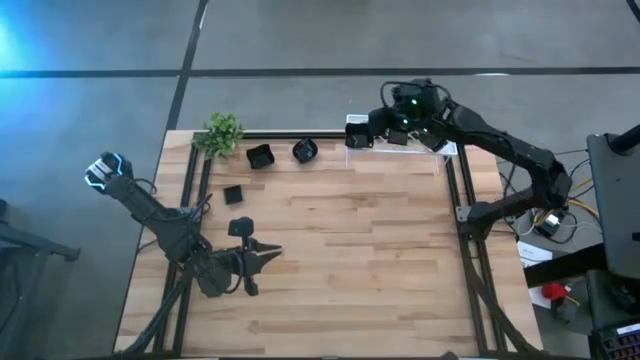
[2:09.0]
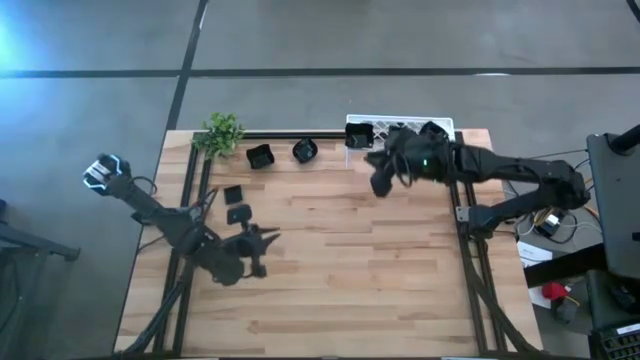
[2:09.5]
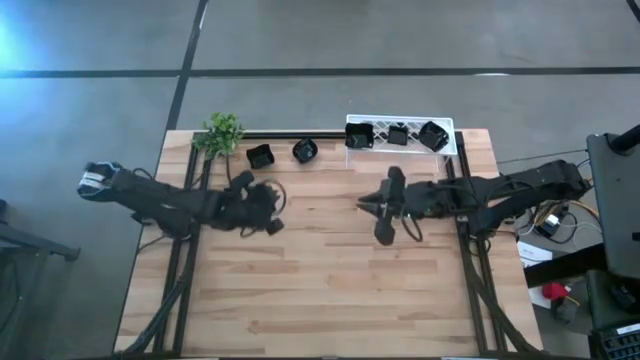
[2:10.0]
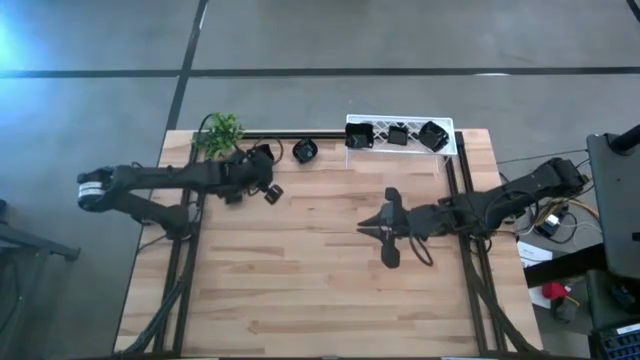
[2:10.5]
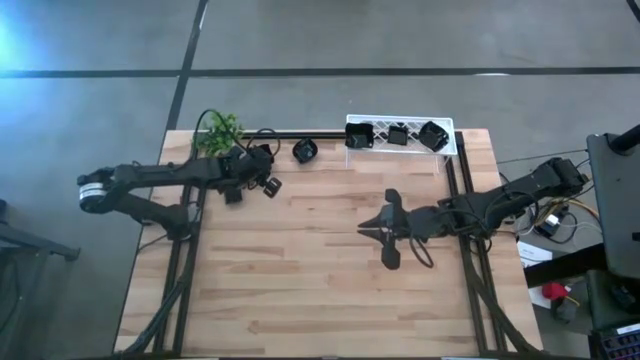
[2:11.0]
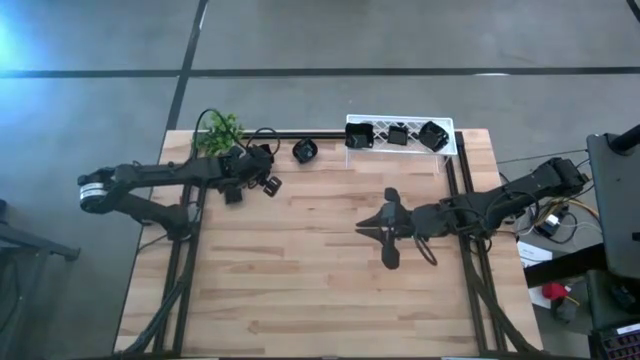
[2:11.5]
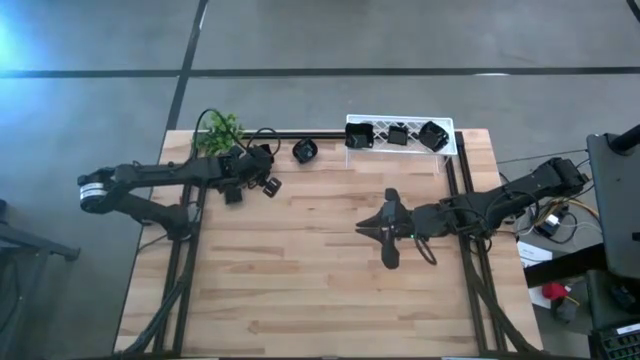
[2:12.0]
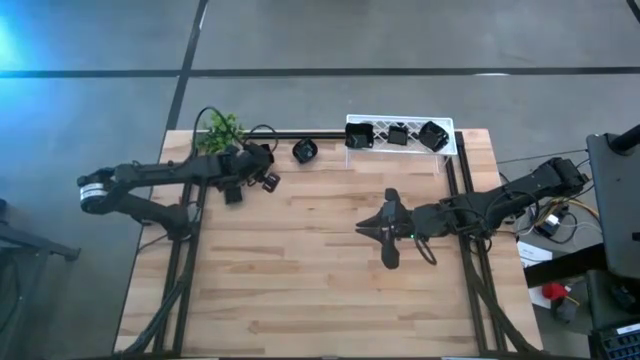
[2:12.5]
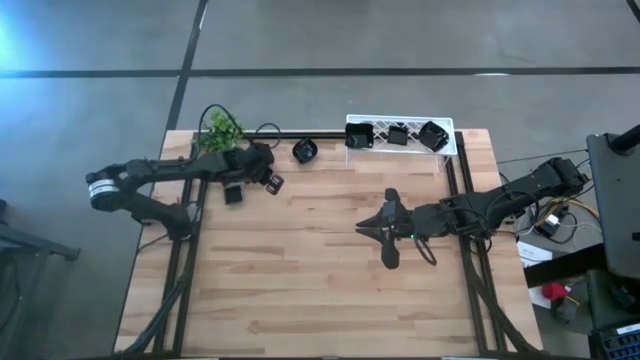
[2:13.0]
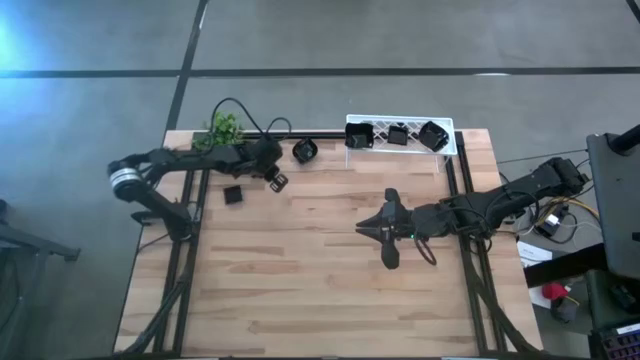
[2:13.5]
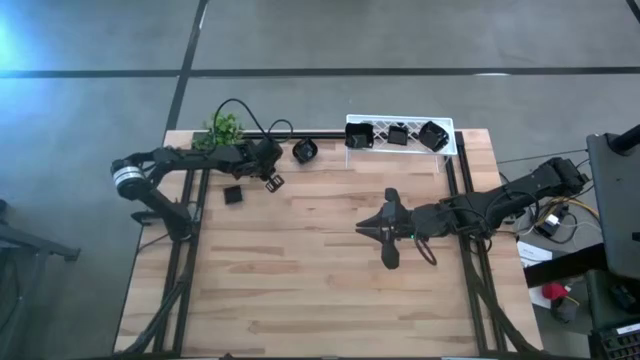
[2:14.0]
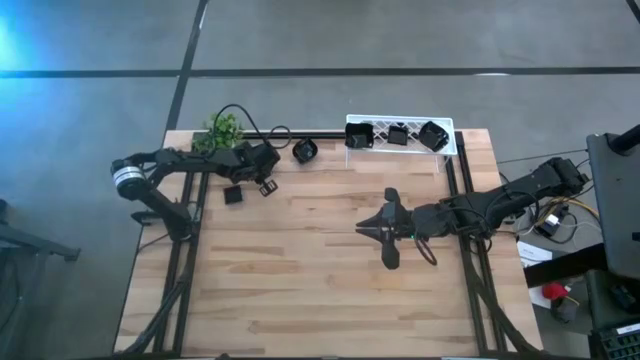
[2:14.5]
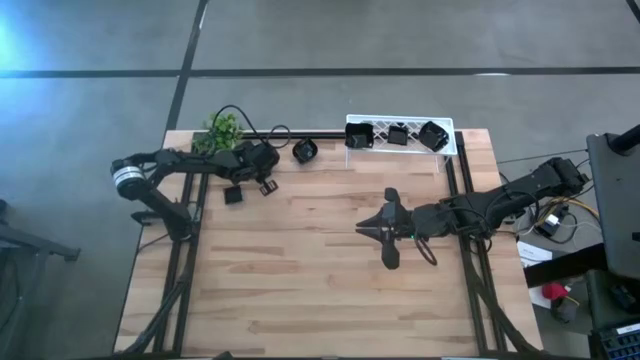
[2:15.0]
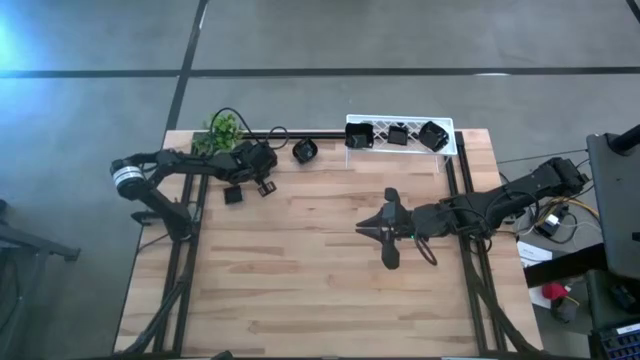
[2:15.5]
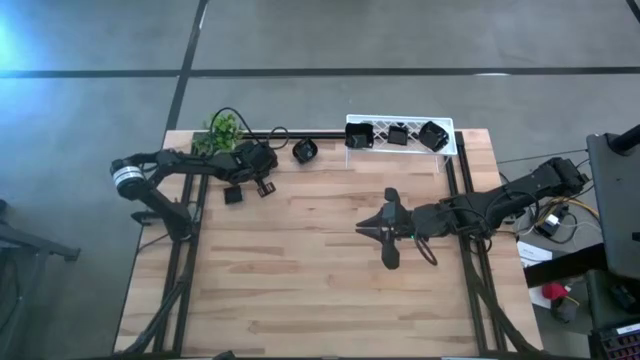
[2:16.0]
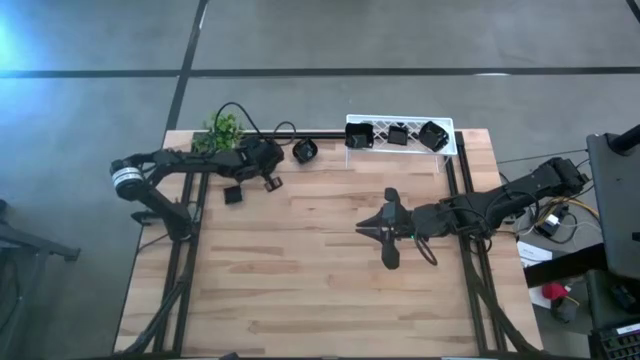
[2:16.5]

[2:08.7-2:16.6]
Task: Pick & Place Mini shaped plates
Stack the black distorted square plate on top of the black distorted square plate on the shelf

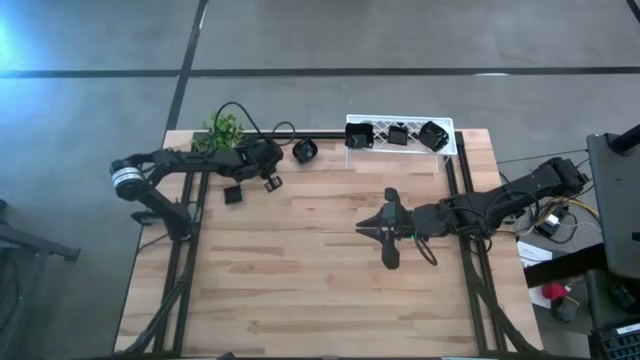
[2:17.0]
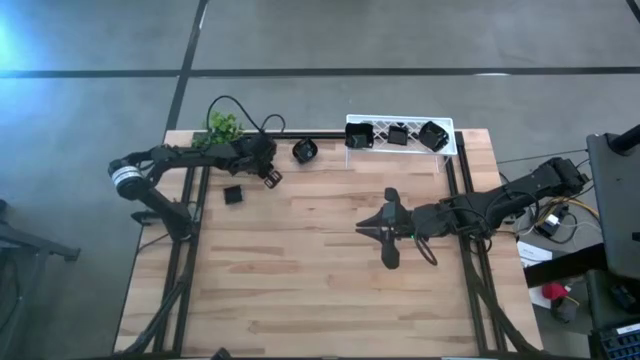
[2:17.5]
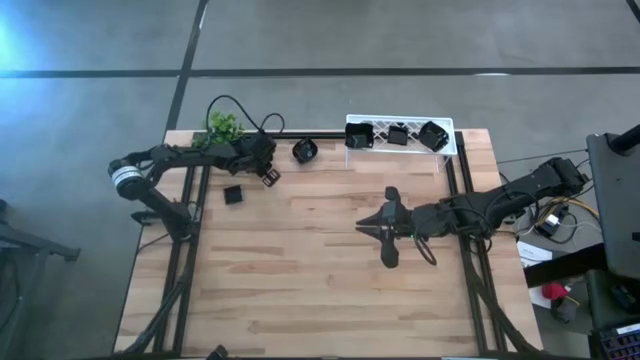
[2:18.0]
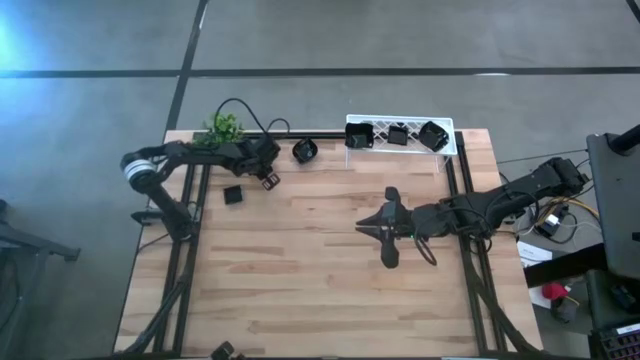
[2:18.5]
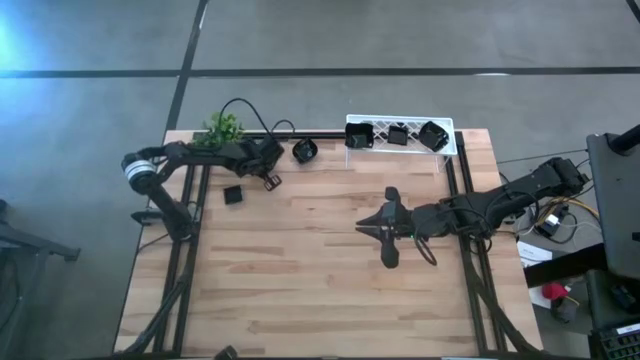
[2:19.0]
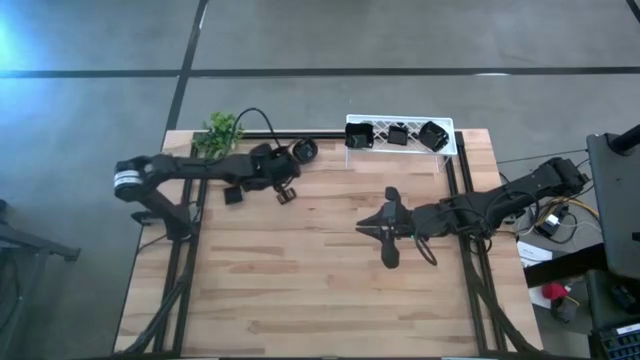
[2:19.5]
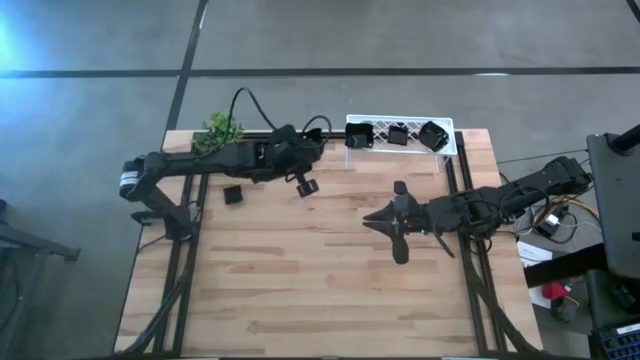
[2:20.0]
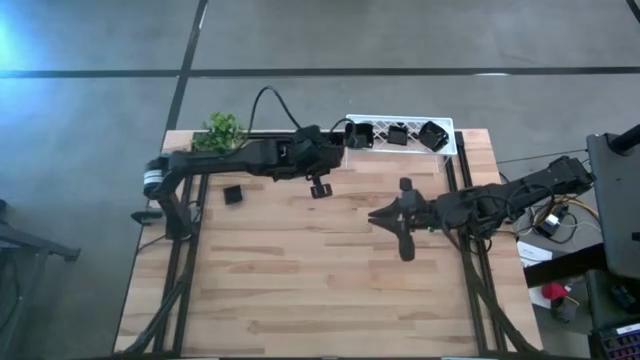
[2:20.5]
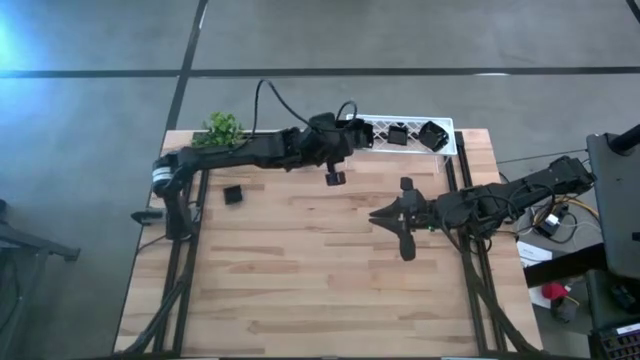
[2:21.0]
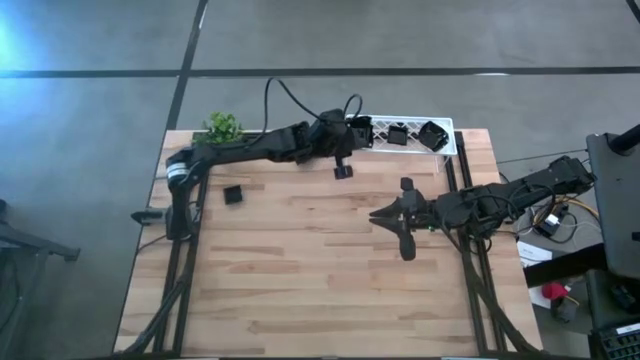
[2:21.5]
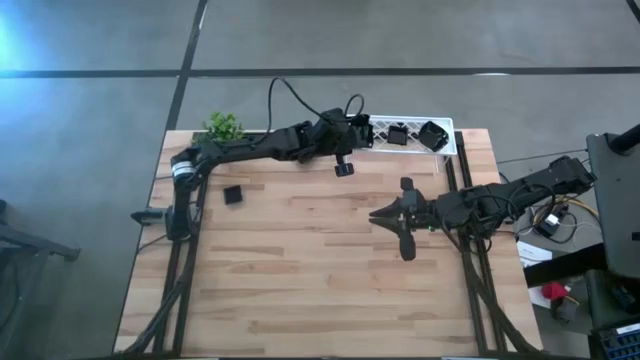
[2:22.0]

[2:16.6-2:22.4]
Stack the black distorted square plate on top of the black distorted square plate on the shelf

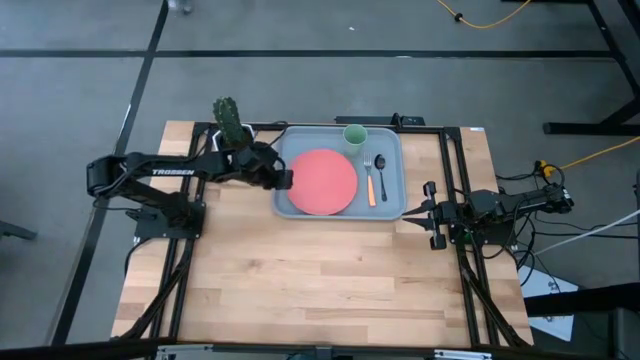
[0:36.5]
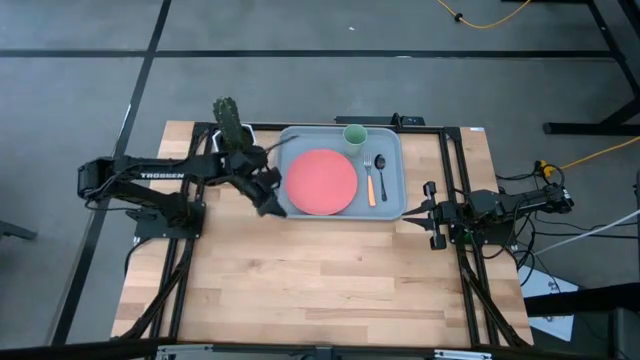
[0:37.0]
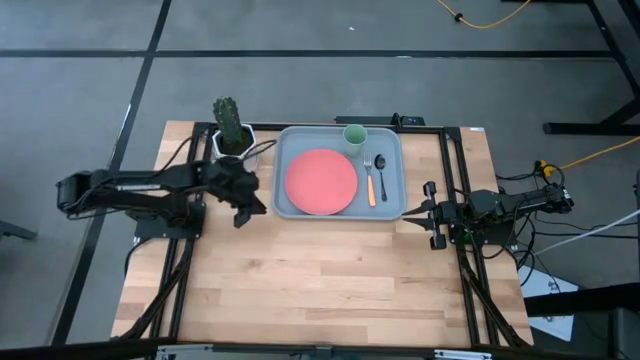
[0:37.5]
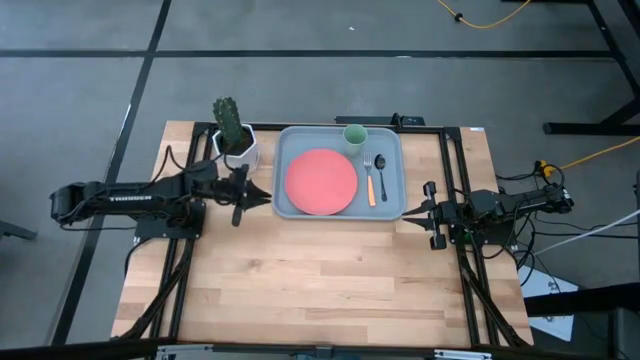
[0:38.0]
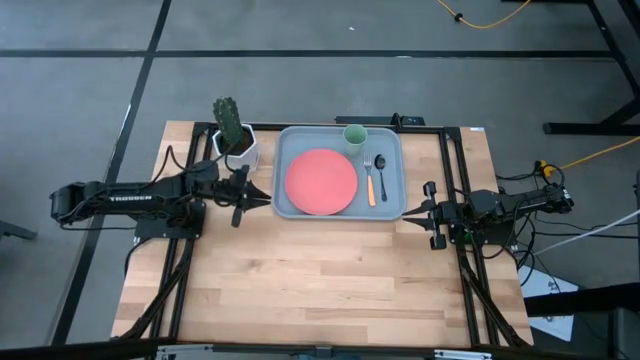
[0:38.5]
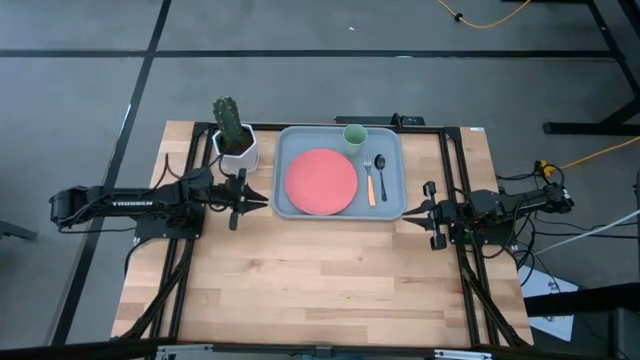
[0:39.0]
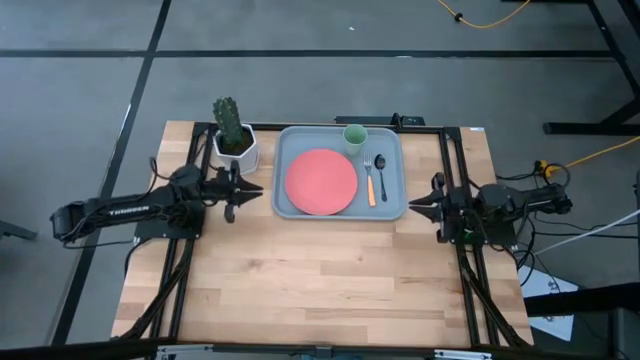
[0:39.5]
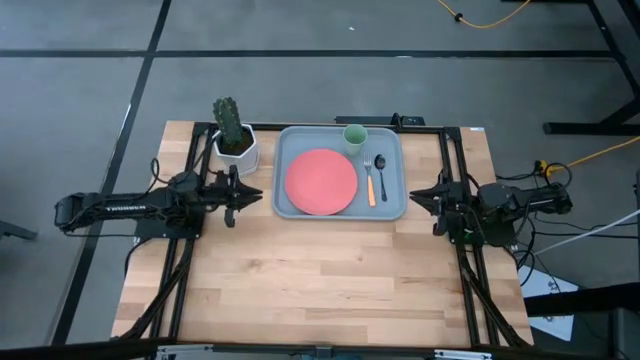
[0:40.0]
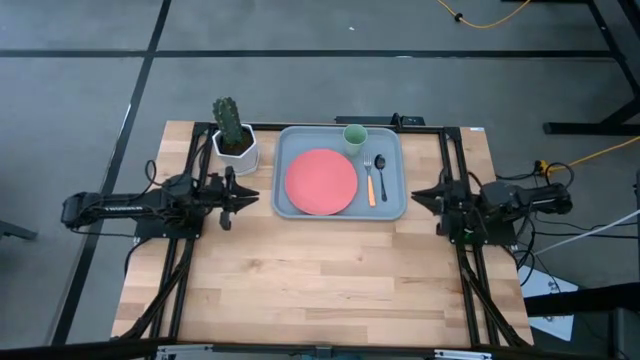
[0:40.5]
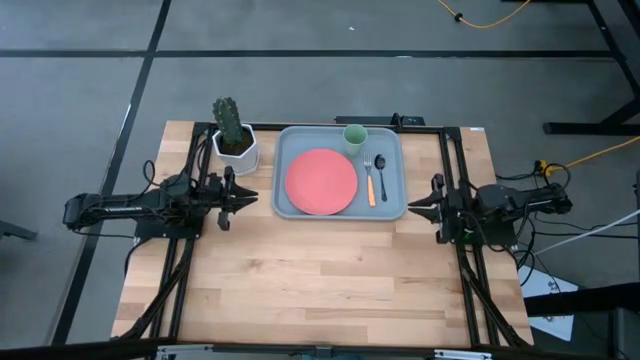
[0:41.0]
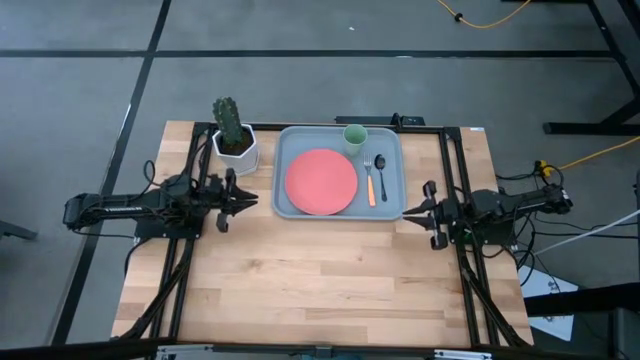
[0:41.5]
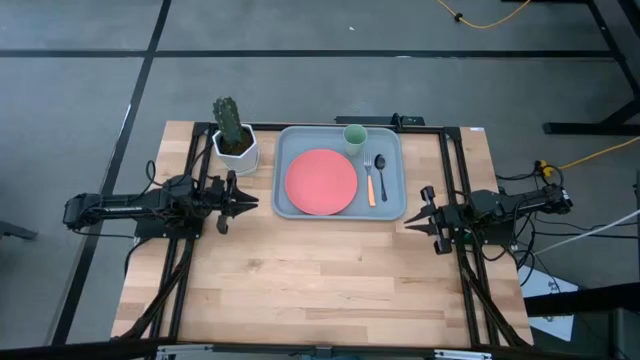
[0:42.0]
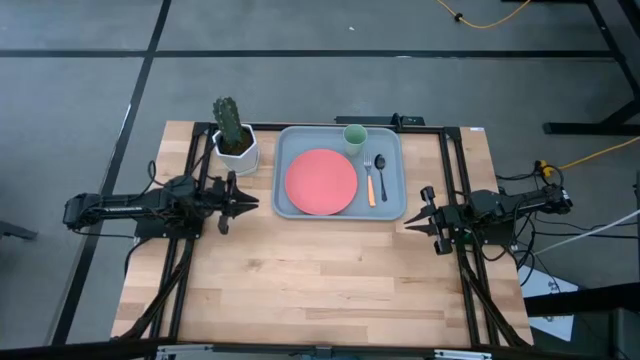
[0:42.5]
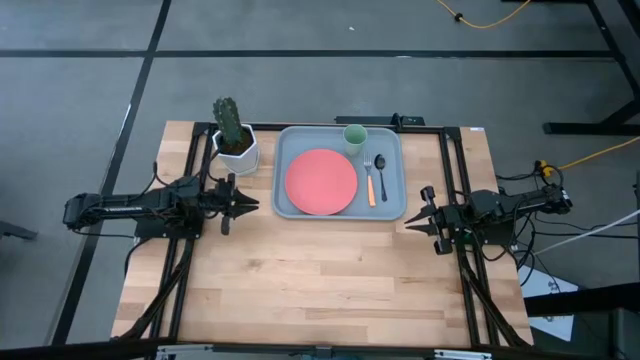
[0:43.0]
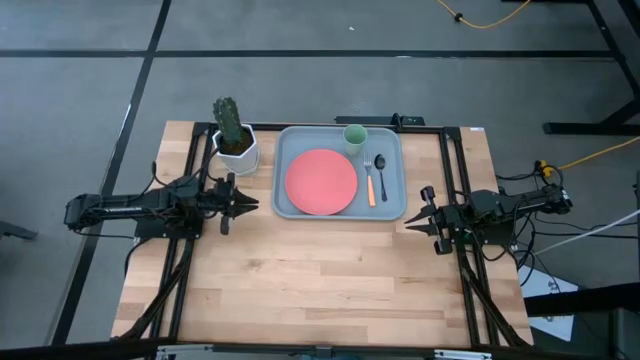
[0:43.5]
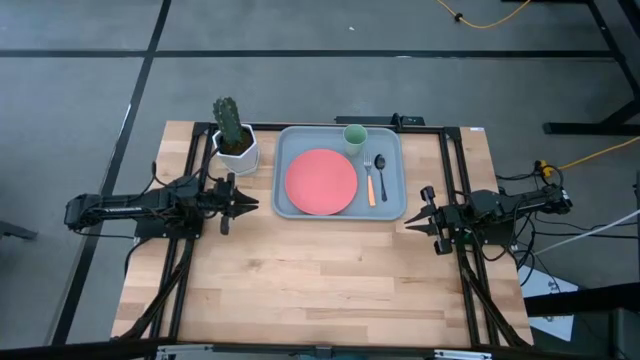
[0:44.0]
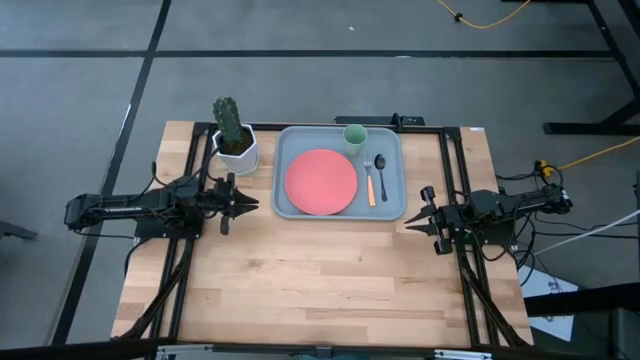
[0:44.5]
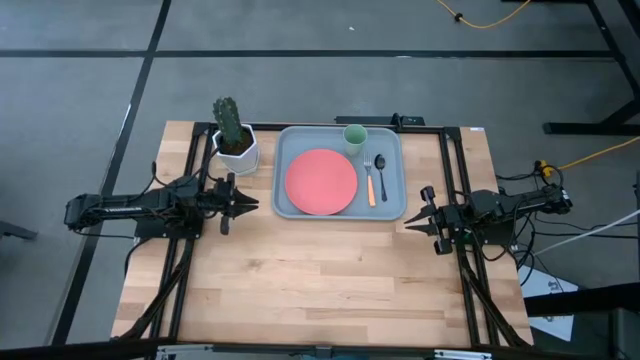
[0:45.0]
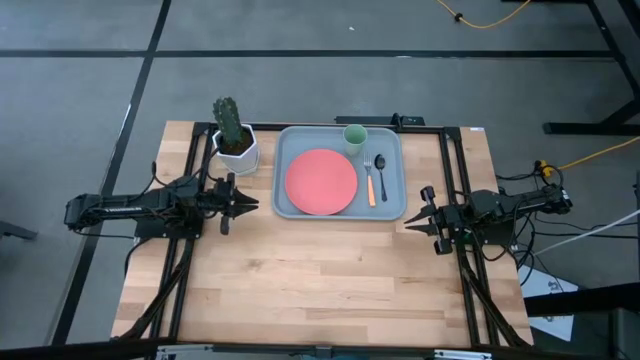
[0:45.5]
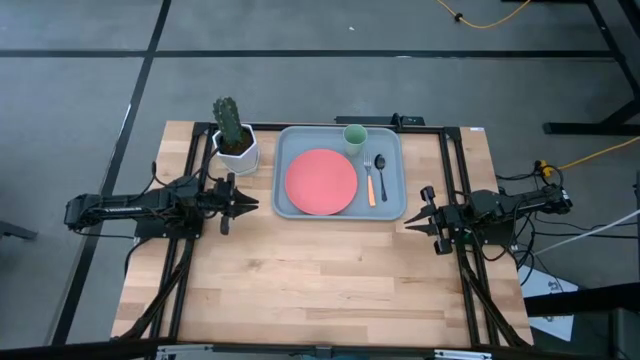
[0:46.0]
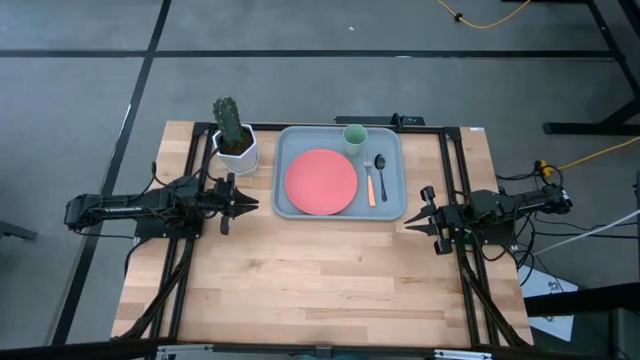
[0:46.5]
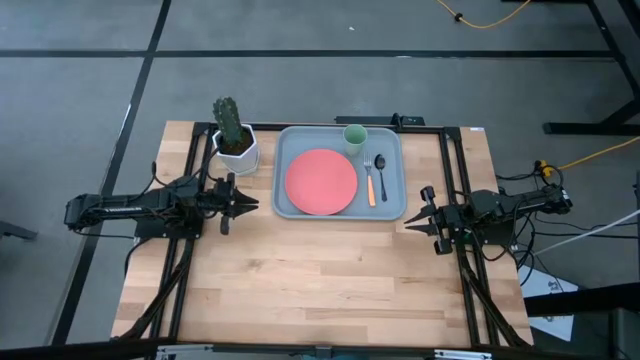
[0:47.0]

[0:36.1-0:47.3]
Task: Pick and place plate/cup/fork/spoon on tray
Return to Home Position
